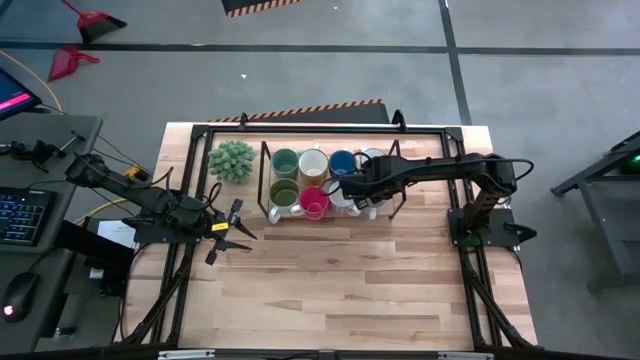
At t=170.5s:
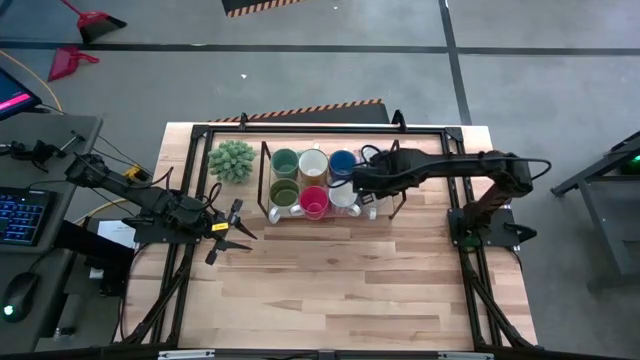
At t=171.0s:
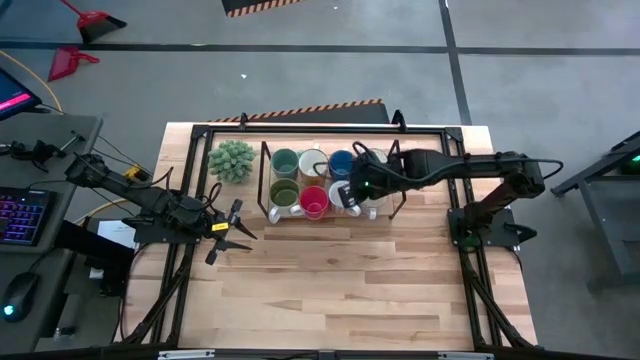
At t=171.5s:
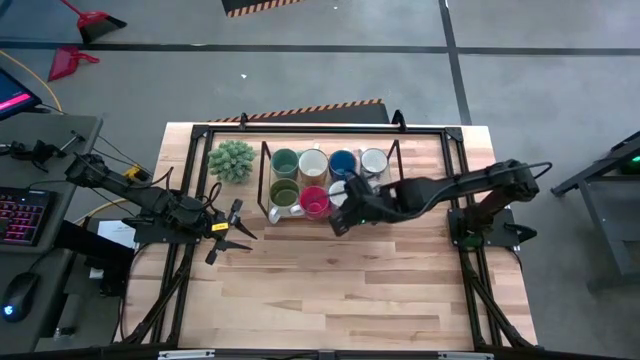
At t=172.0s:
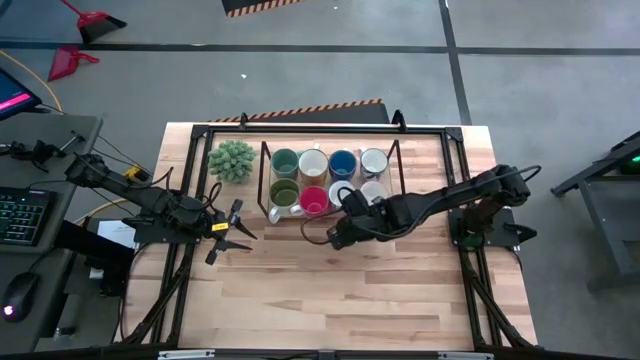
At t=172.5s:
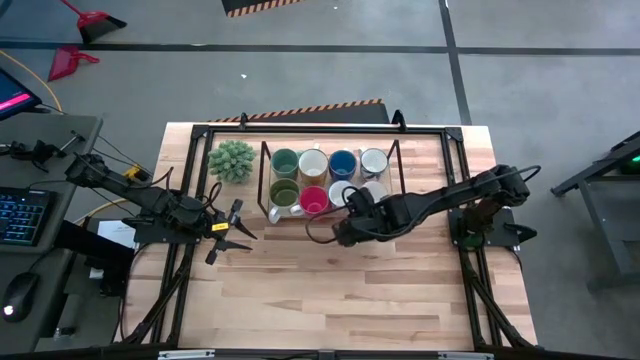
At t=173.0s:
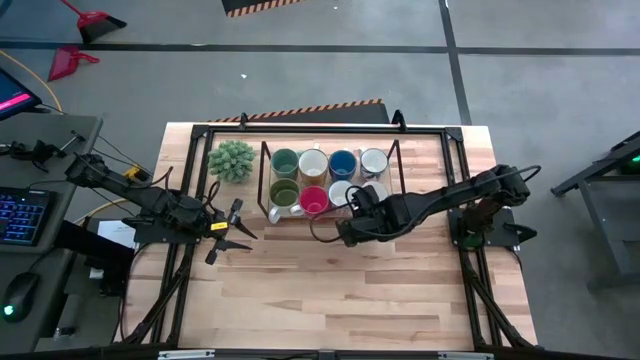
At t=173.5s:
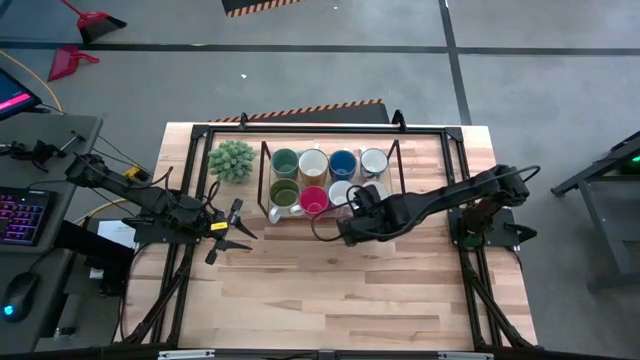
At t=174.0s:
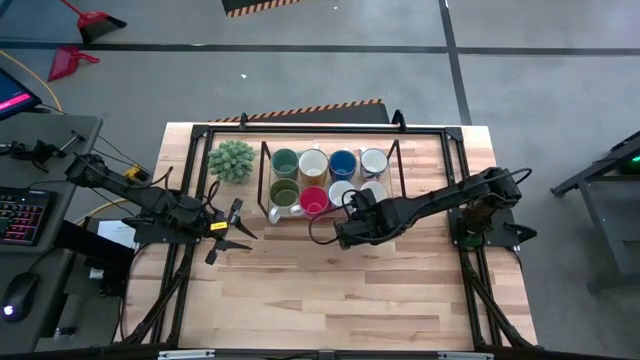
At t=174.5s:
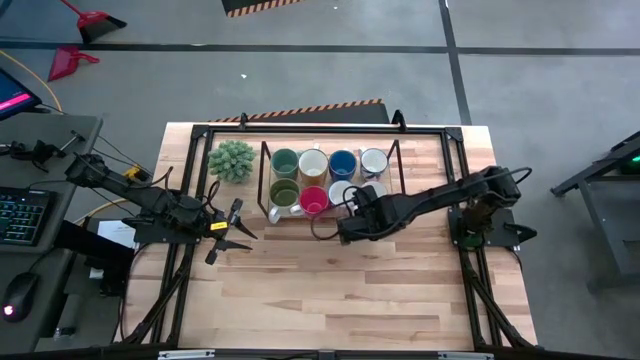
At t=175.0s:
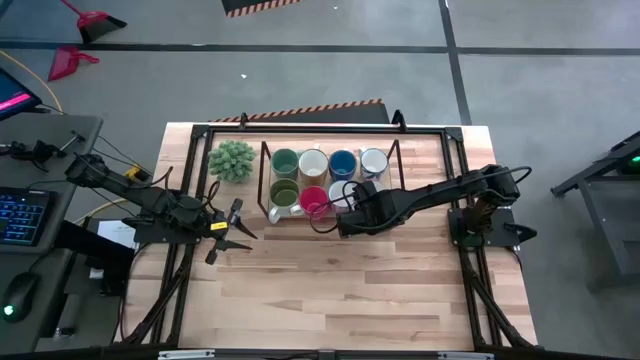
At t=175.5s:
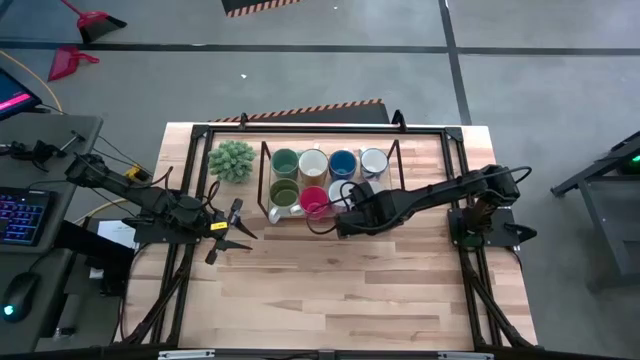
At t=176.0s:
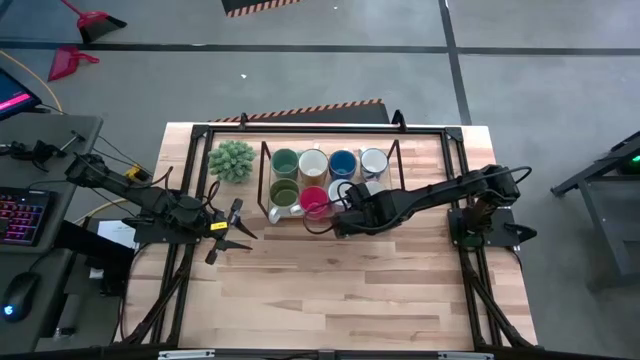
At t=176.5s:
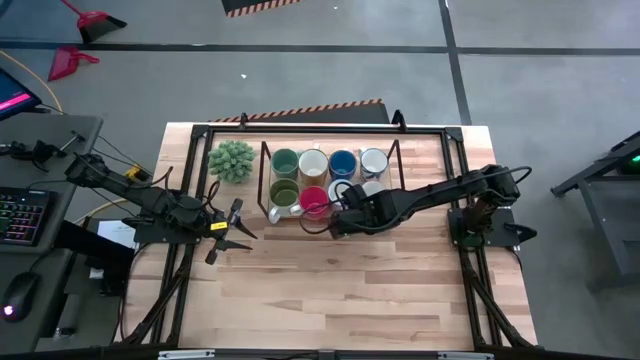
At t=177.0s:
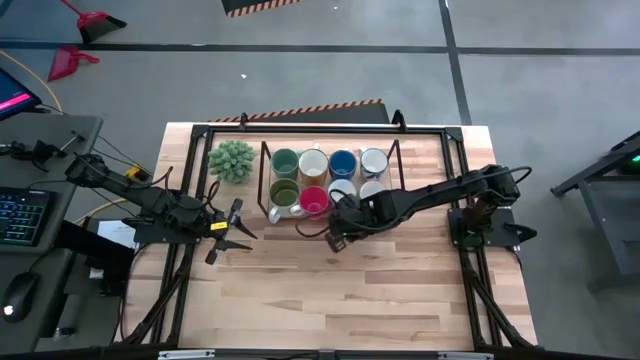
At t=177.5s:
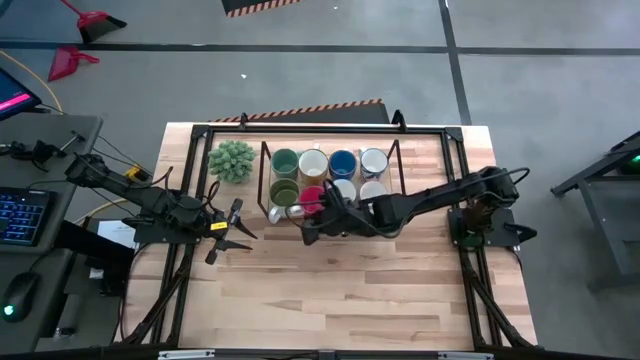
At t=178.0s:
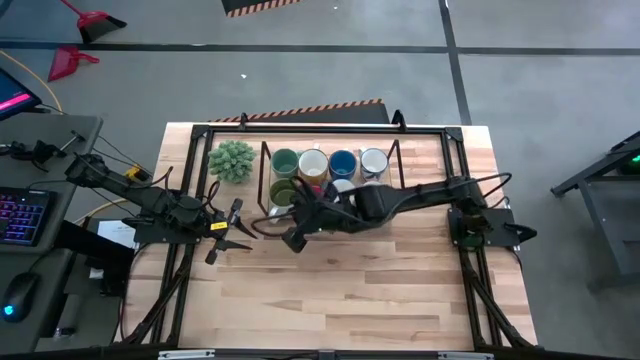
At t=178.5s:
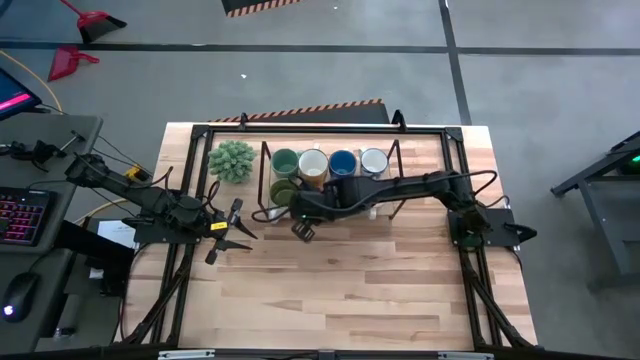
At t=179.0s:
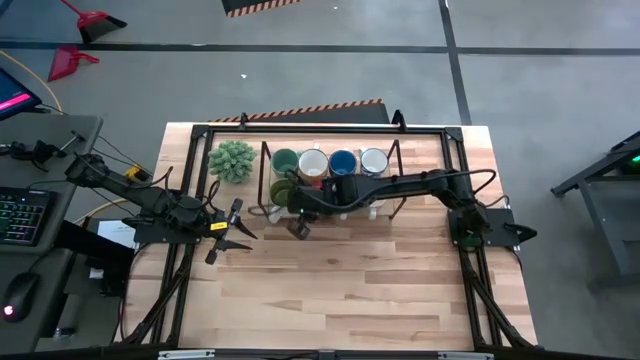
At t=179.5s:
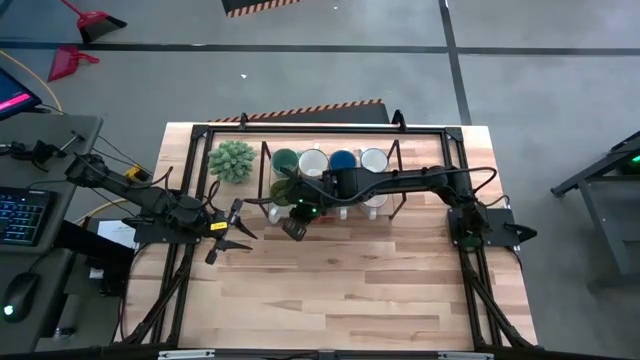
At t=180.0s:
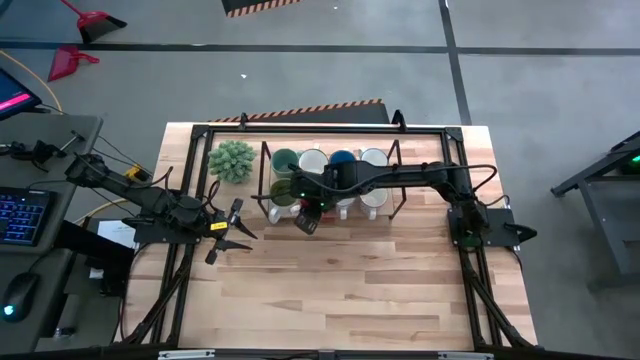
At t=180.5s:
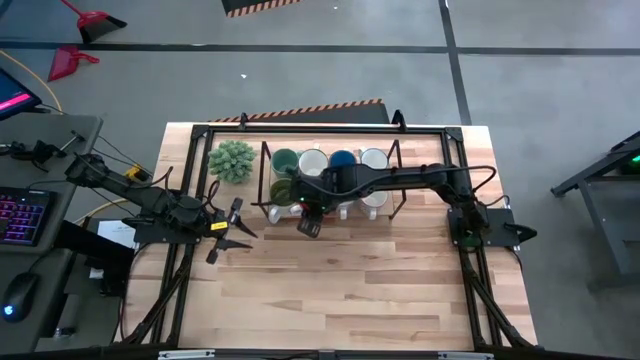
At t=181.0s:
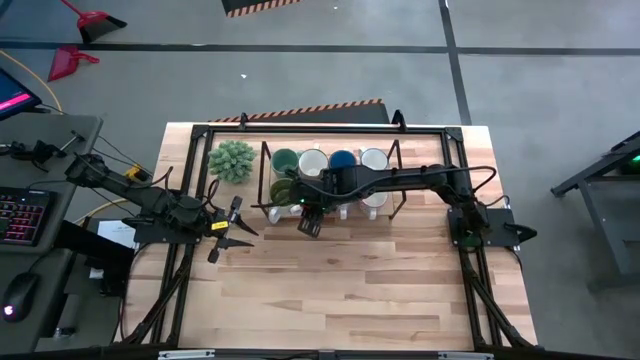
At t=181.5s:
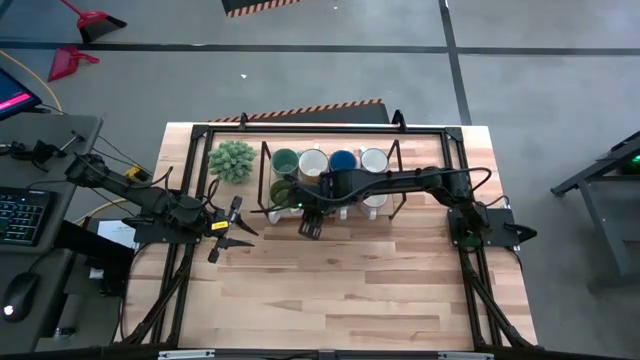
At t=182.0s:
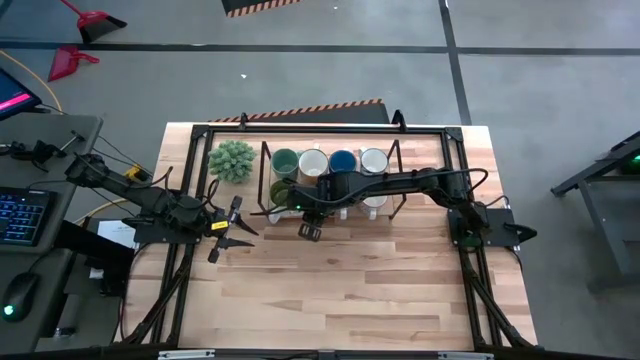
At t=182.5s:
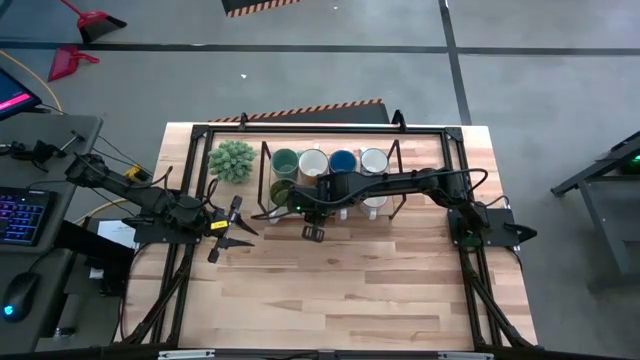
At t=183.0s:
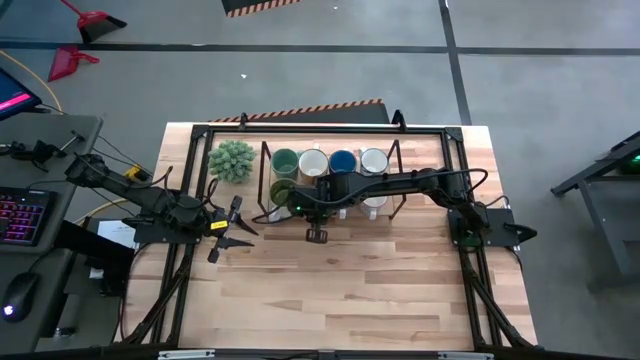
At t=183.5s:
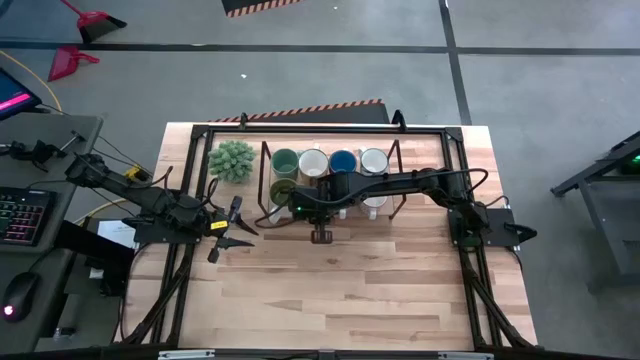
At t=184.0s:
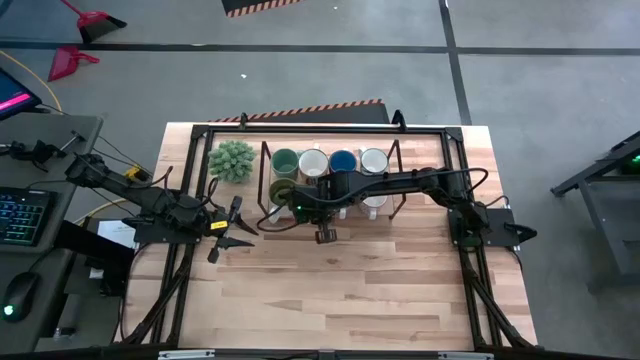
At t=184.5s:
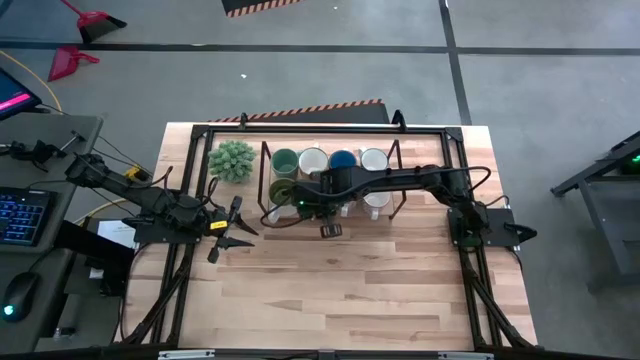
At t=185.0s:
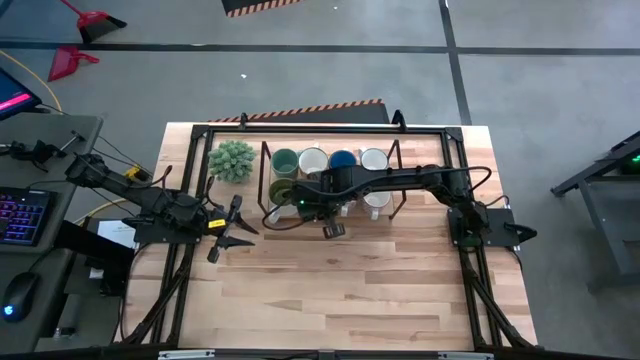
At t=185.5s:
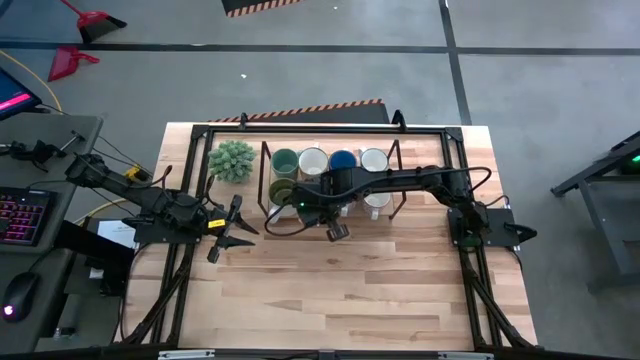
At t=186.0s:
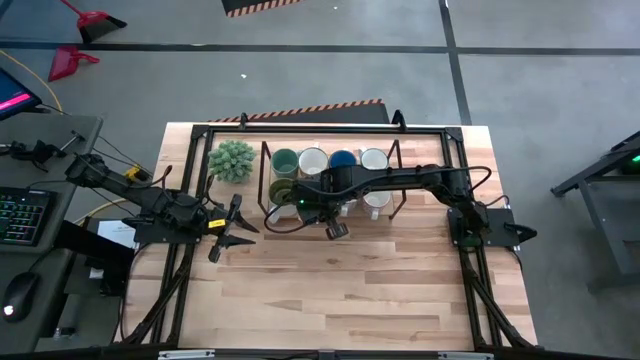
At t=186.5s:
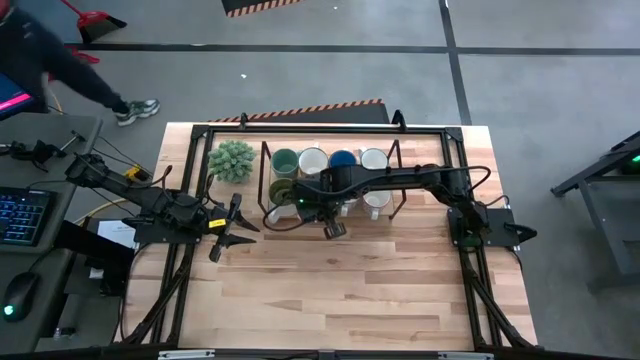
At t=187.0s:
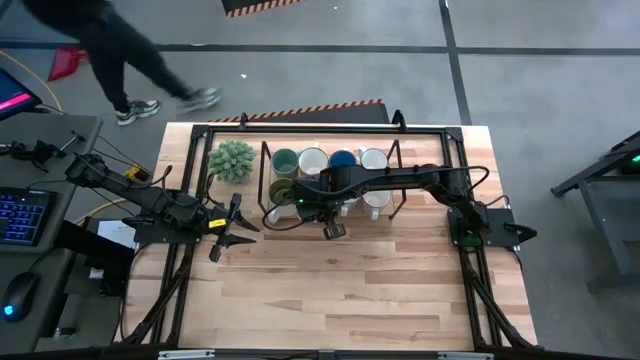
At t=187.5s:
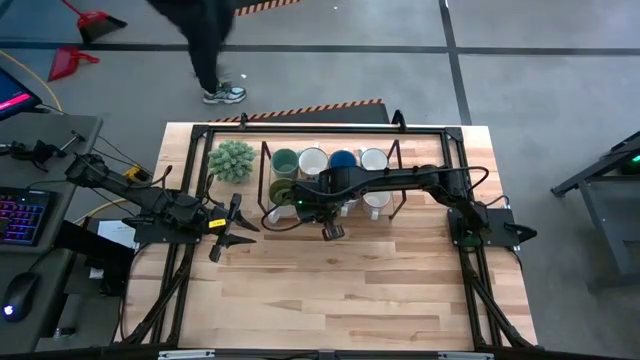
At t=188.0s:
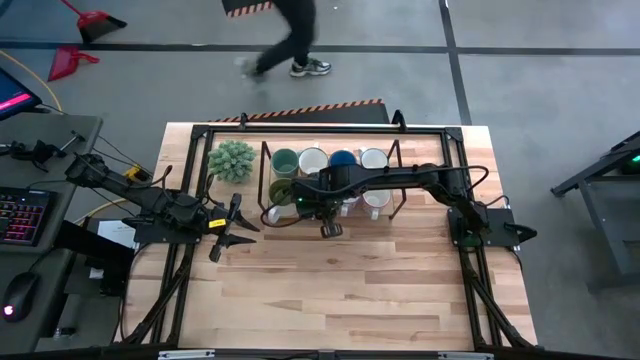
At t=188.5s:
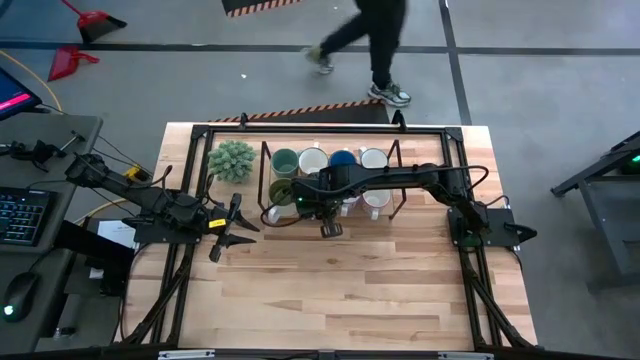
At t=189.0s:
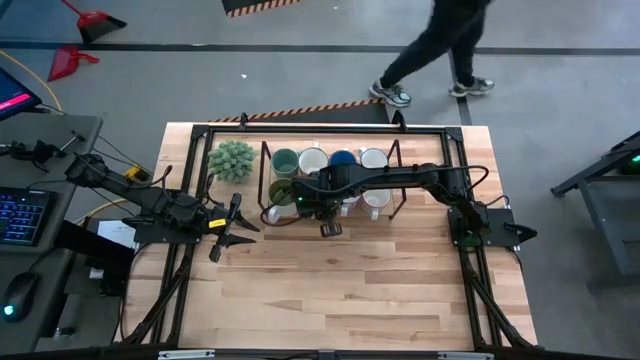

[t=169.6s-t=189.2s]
Task: Place coffee mugs
Adjust the mugs on the shelf
